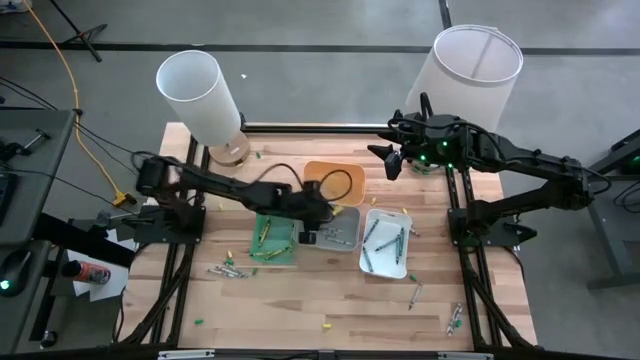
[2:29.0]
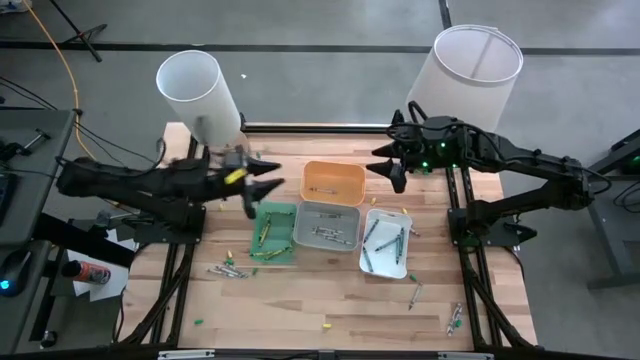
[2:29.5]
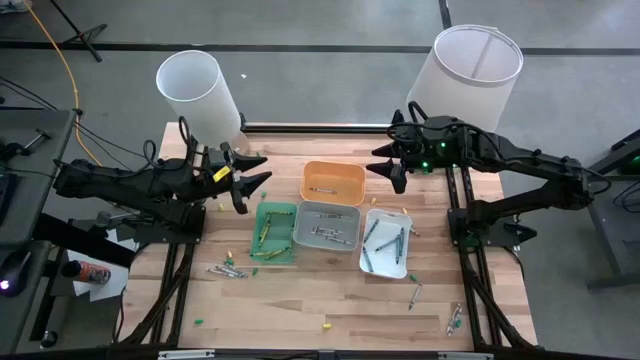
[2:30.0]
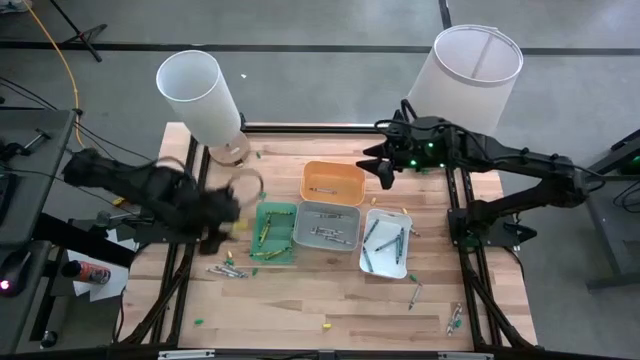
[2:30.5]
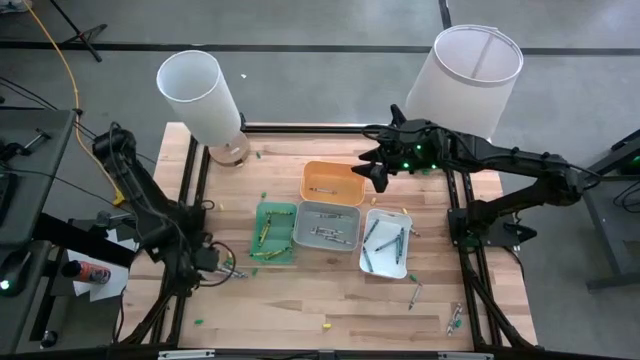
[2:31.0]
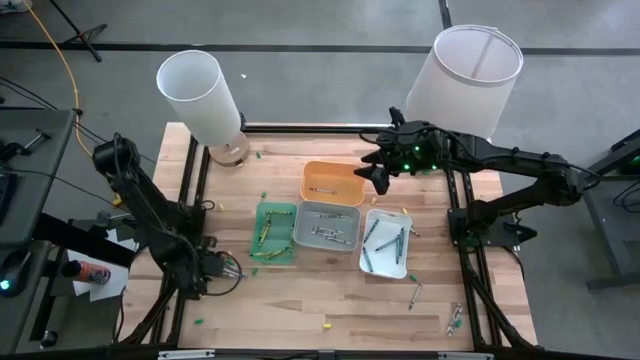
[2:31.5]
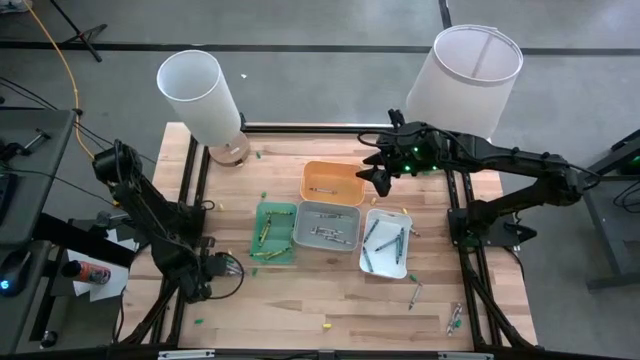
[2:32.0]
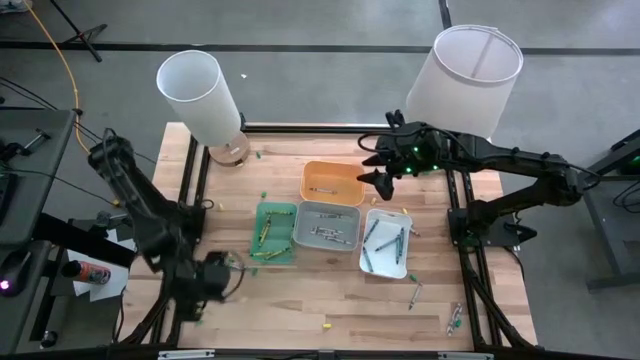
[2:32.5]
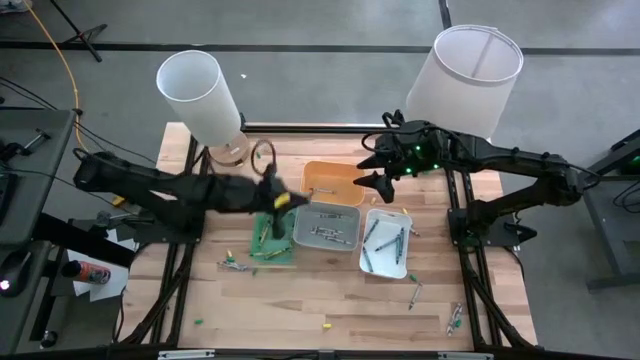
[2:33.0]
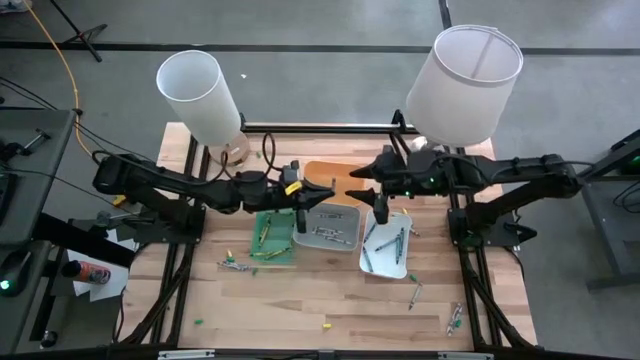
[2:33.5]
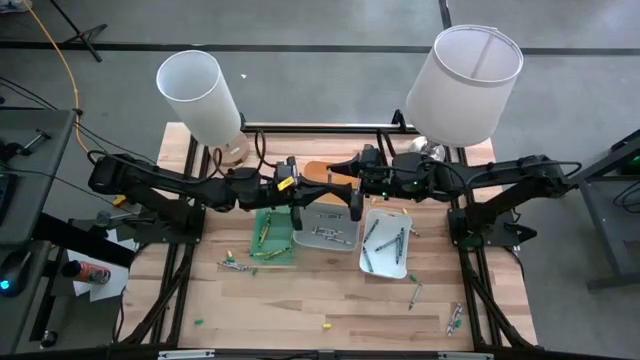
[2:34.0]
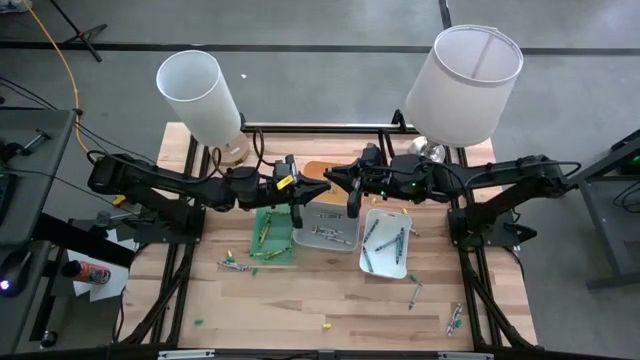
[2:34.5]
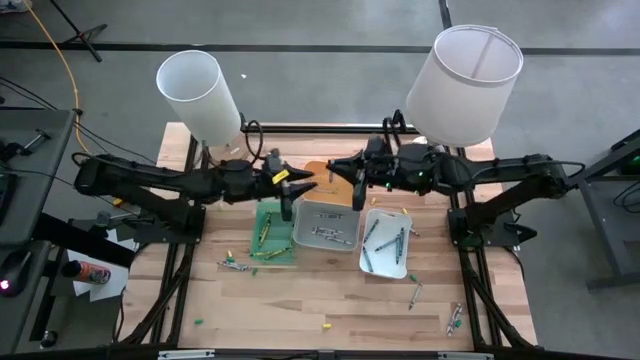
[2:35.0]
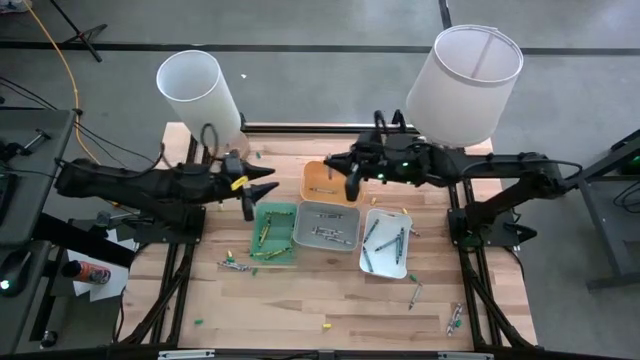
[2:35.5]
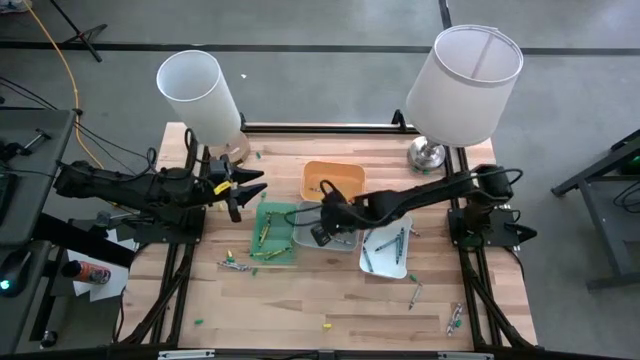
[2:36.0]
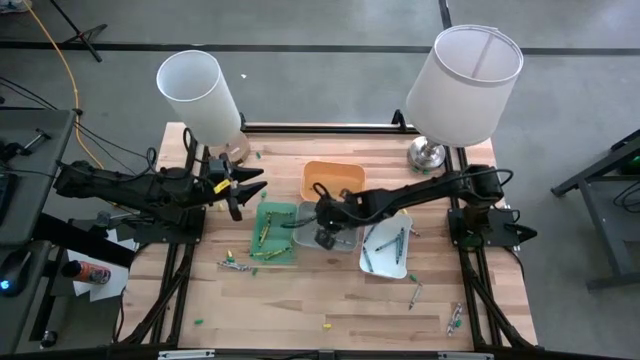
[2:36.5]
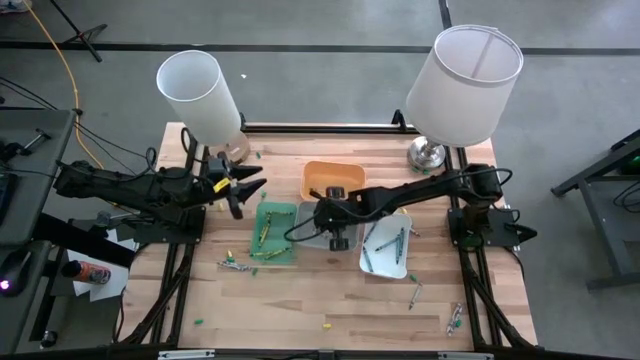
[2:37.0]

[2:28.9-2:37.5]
Task: Sort crayons
Put the white crayon into the gray bin

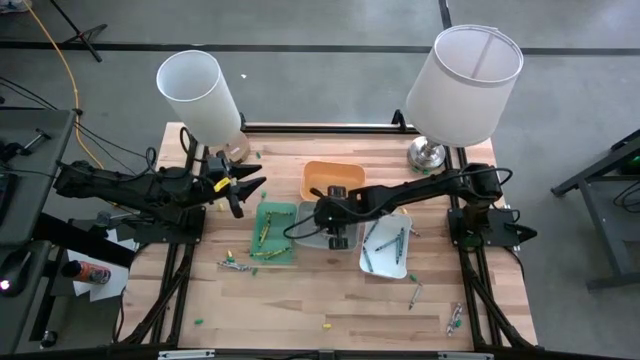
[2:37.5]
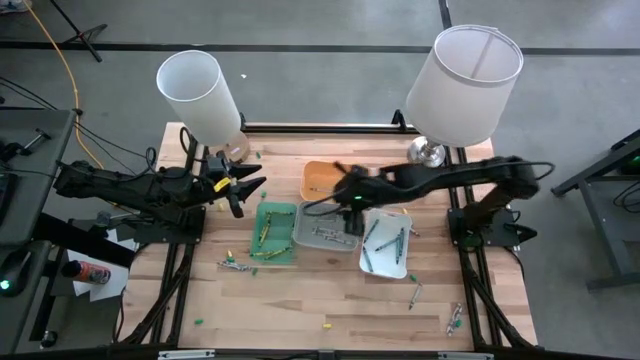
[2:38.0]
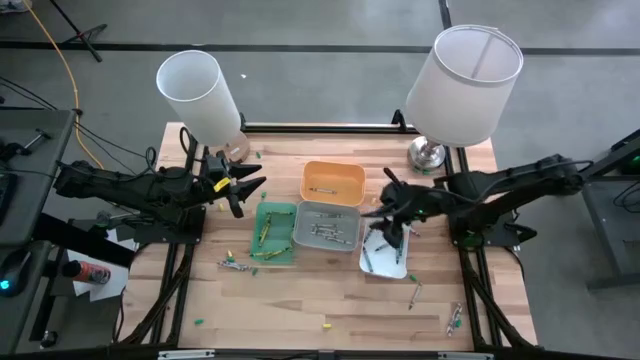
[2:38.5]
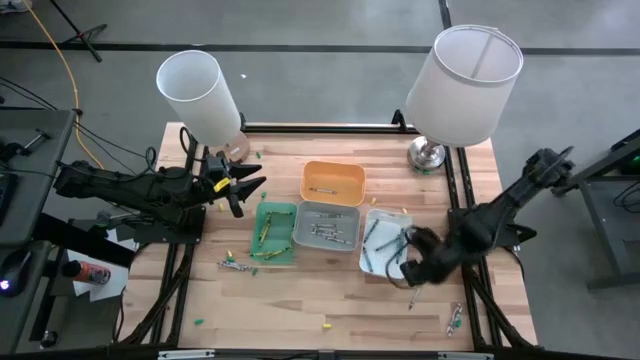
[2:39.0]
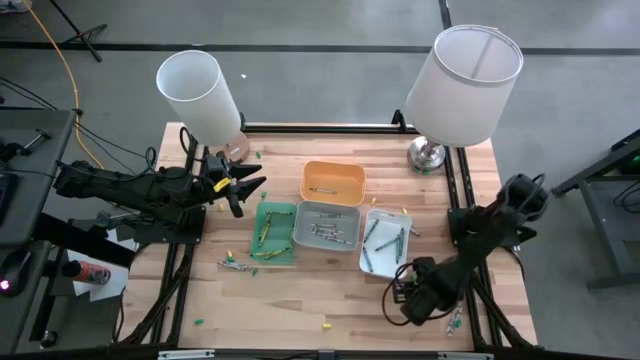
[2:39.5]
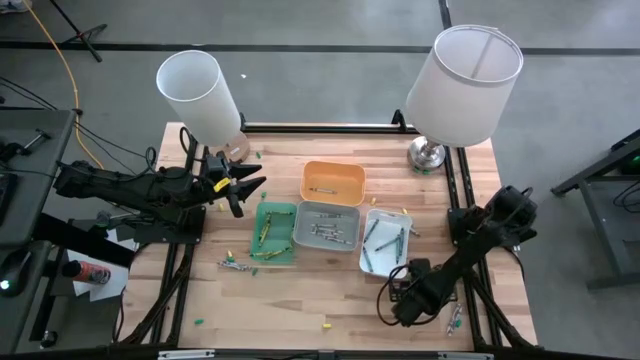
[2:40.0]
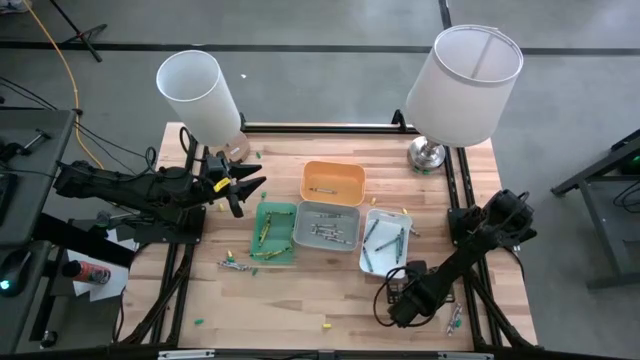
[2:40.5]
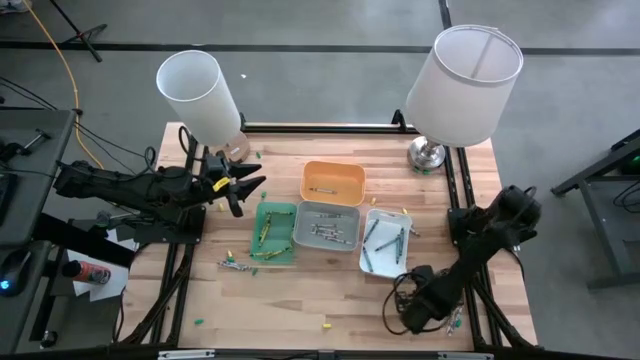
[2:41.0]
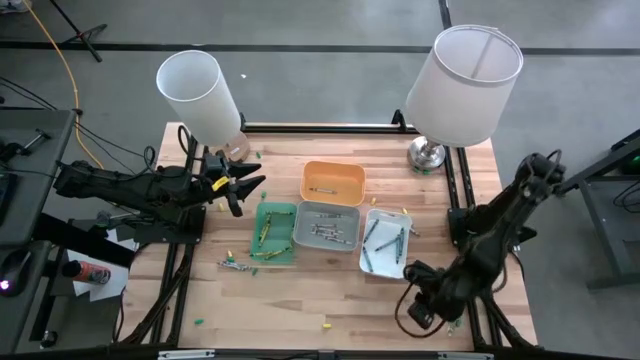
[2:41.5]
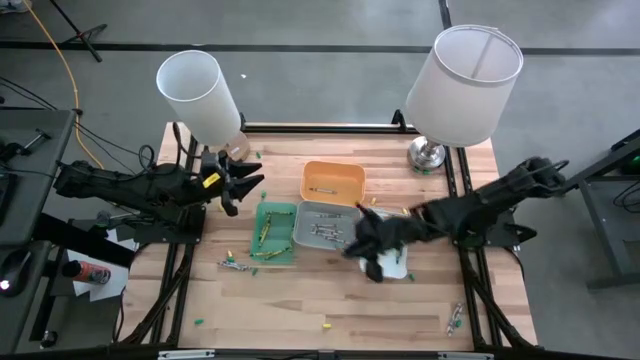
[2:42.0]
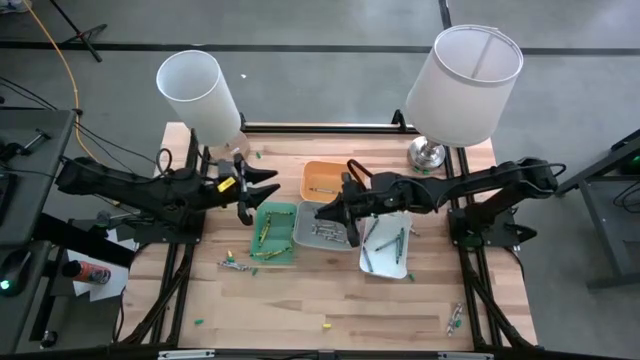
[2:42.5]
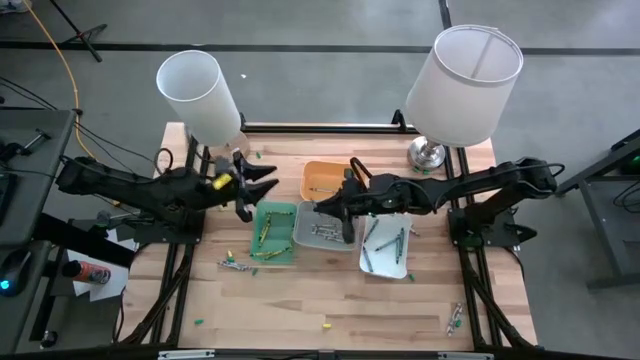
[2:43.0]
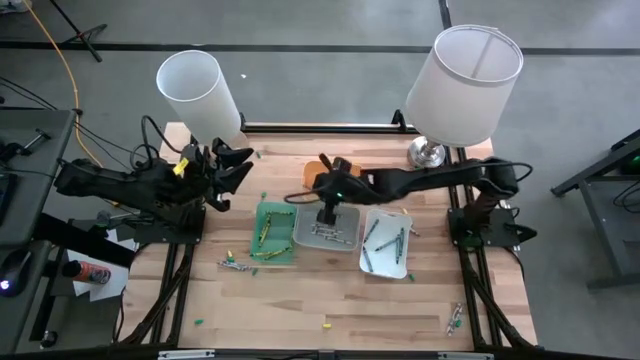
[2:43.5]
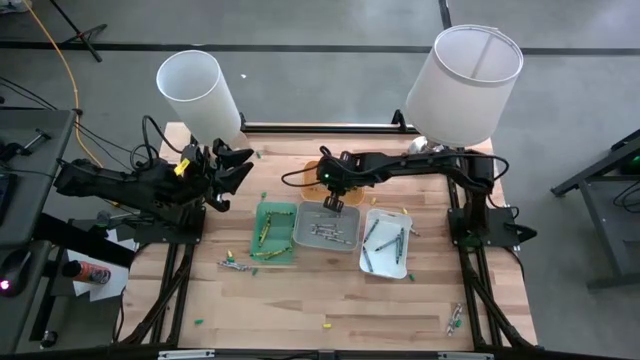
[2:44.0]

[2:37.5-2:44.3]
Put the gray crayon into the yellow bin

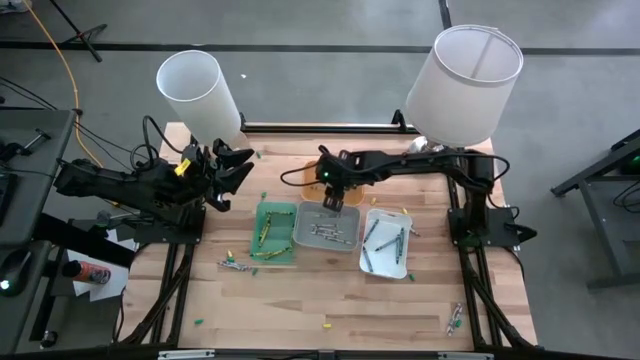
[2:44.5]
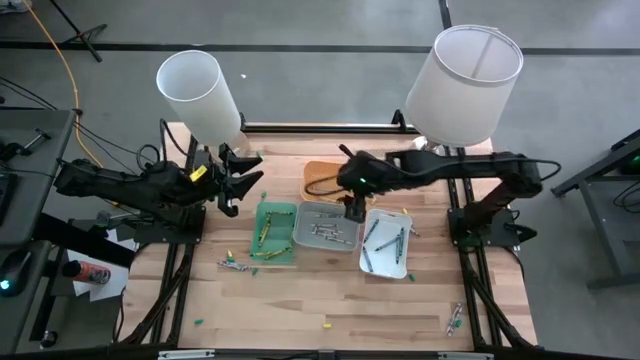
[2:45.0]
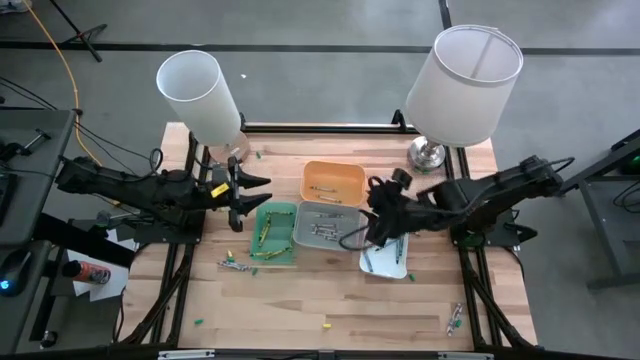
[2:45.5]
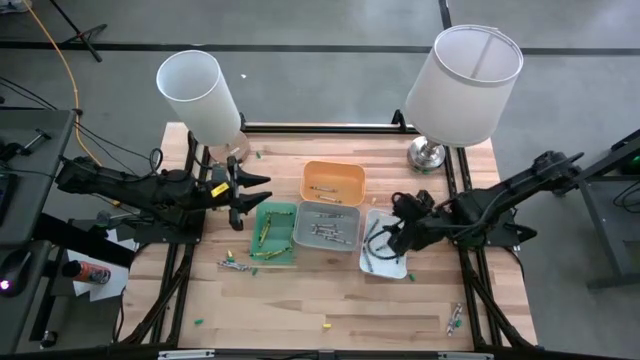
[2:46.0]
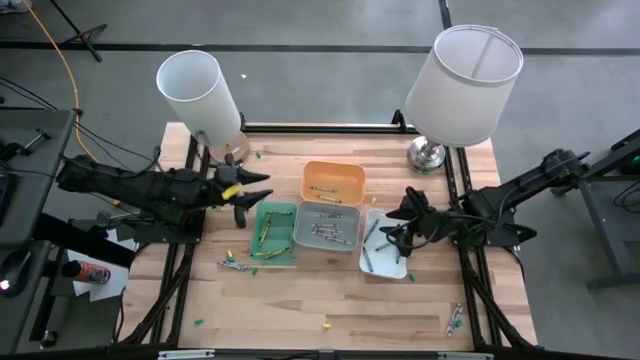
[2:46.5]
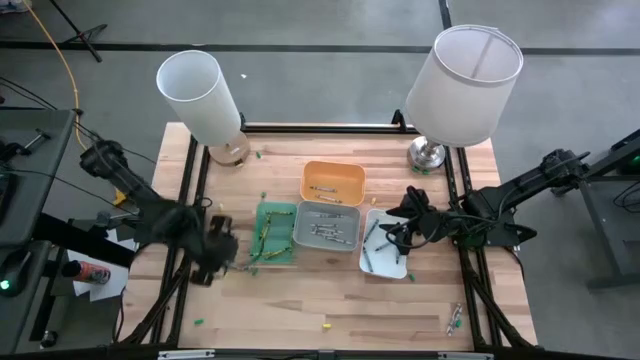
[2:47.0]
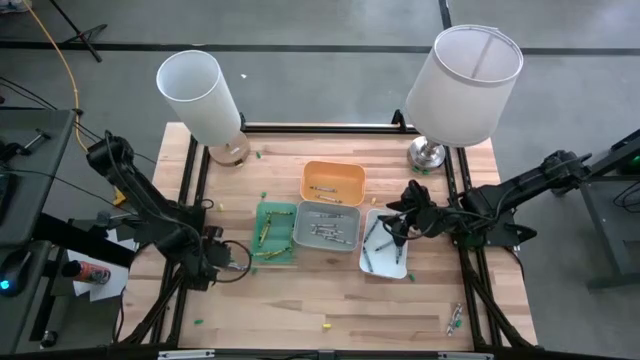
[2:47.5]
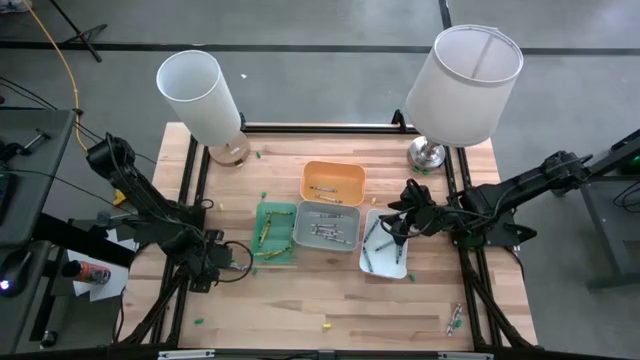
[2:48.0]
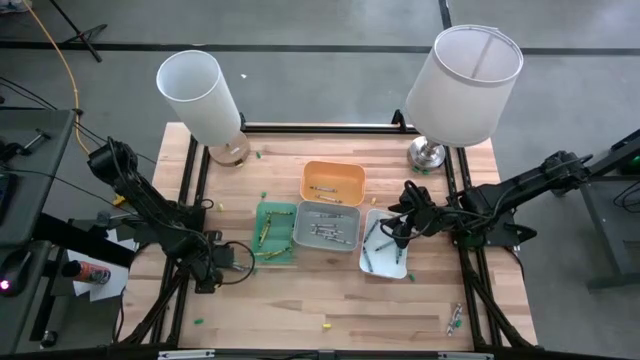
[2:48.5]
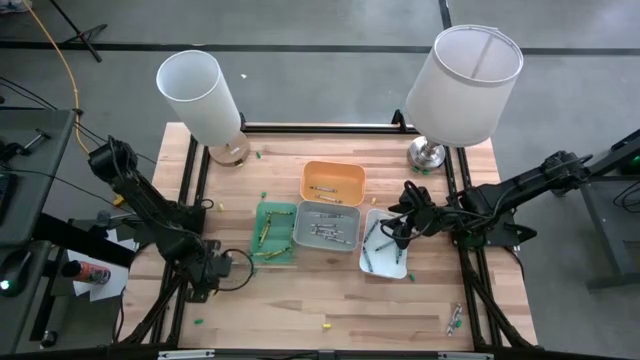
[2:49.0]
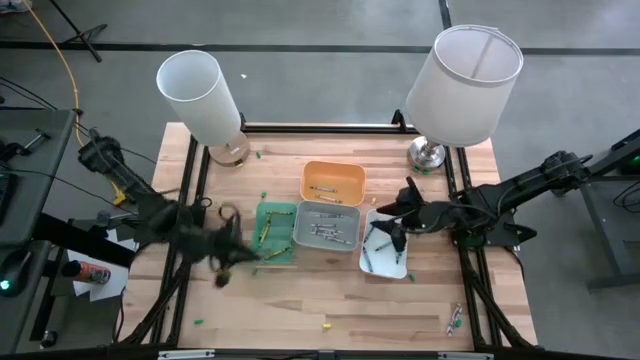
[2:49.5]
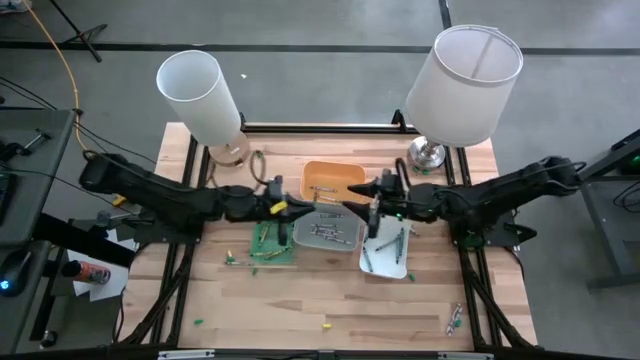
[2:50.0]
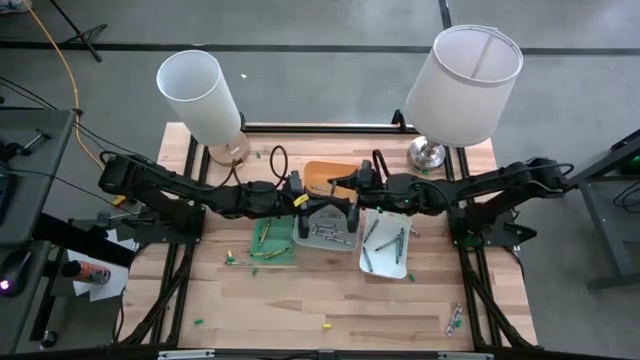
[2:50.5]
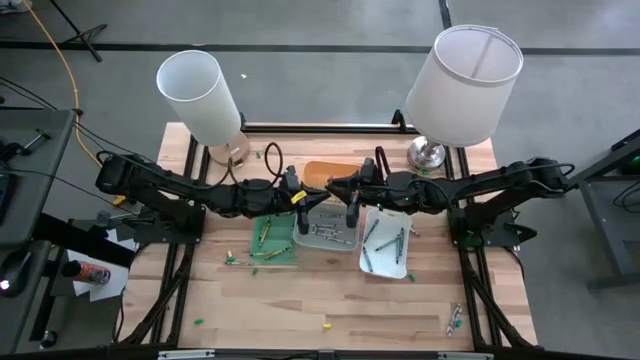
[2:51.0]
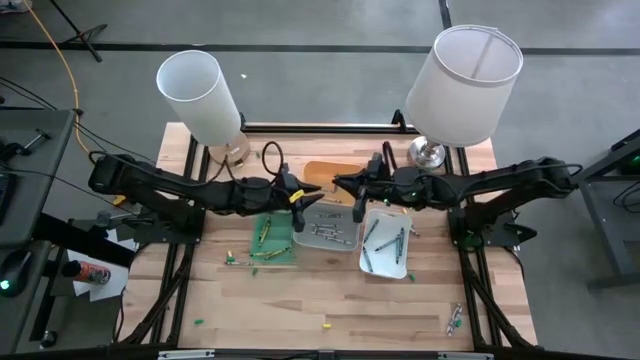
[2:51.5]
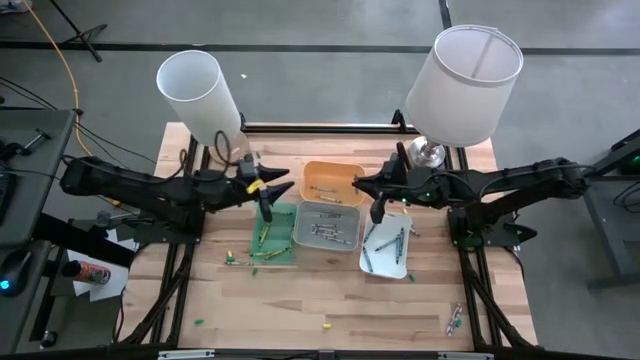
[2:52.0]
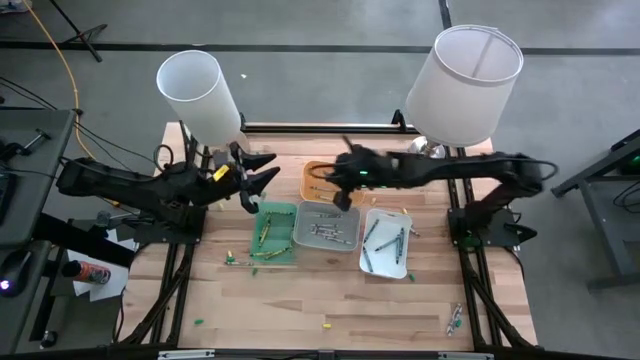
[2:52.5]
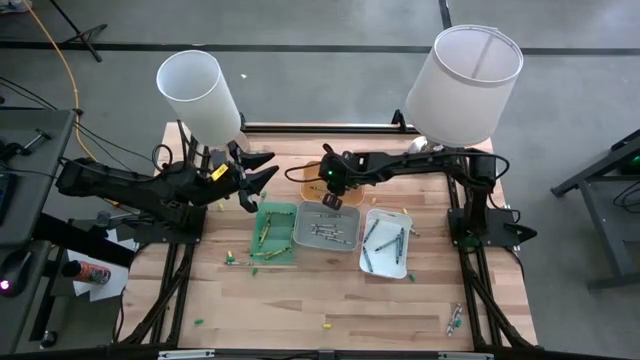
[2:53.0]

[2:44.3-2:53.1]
Put the gray crayon into the yellow bin
